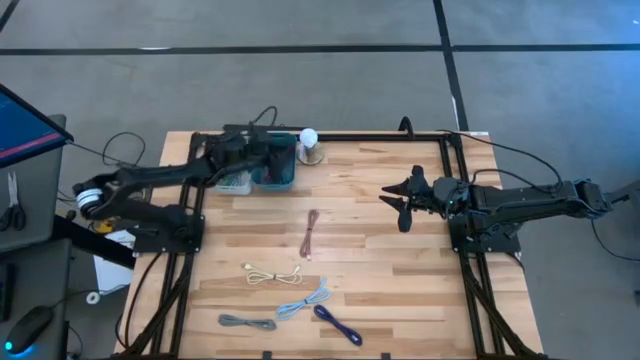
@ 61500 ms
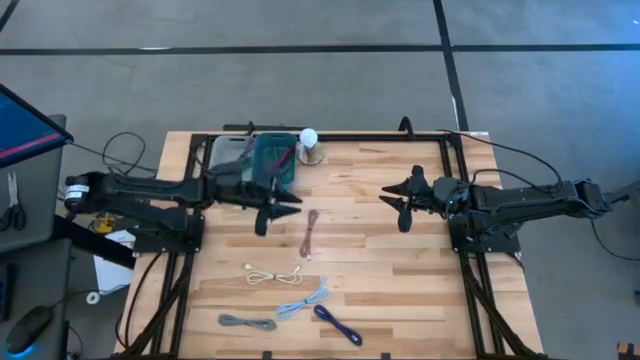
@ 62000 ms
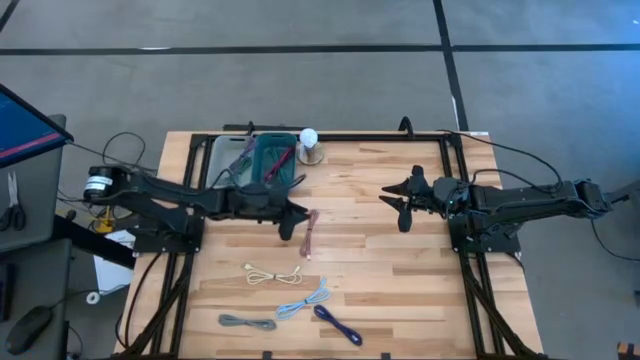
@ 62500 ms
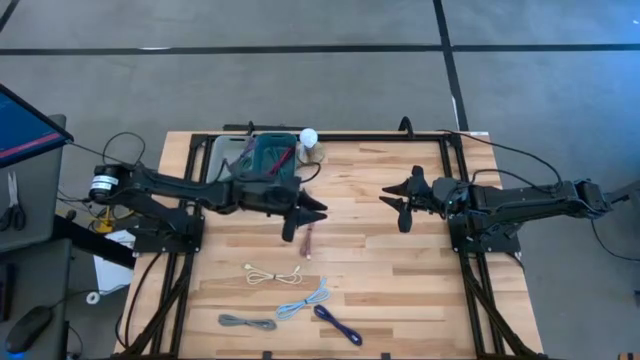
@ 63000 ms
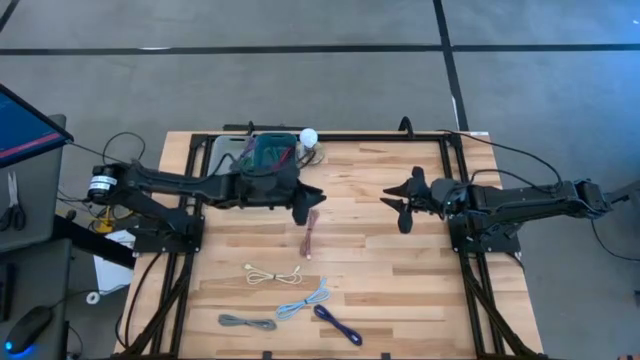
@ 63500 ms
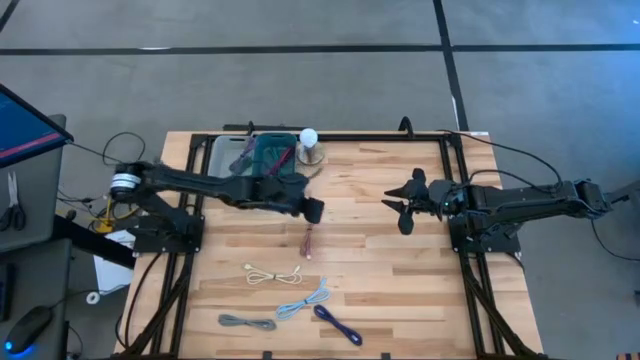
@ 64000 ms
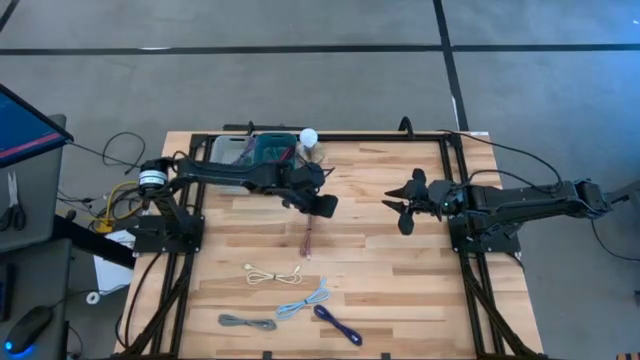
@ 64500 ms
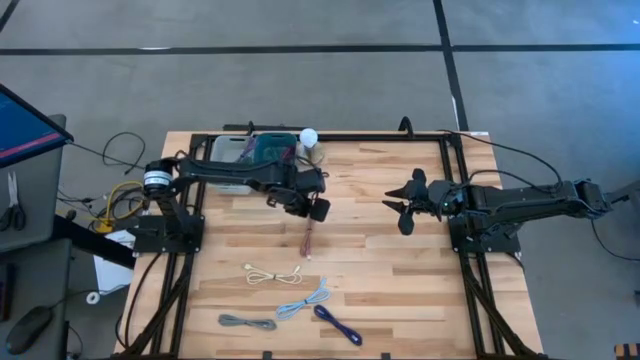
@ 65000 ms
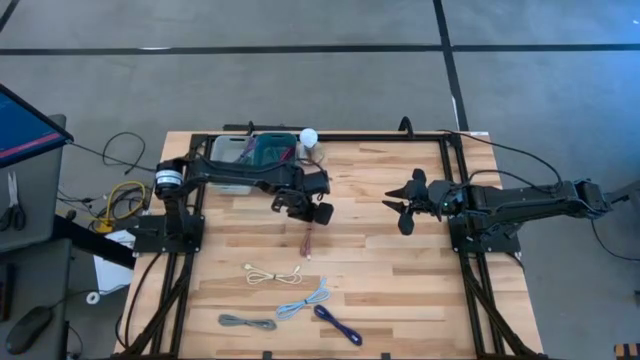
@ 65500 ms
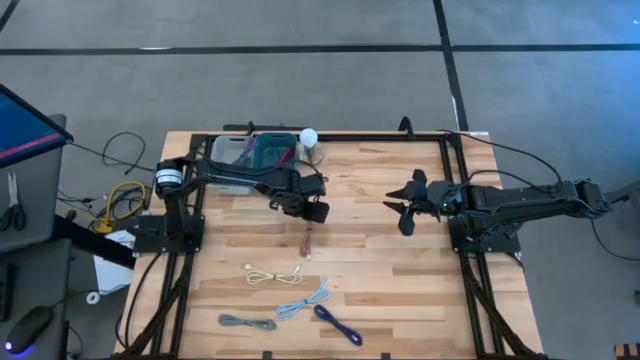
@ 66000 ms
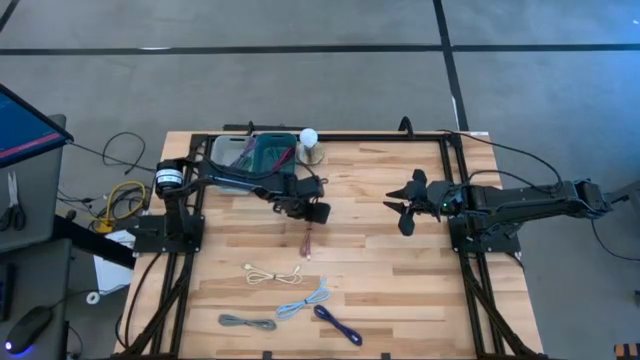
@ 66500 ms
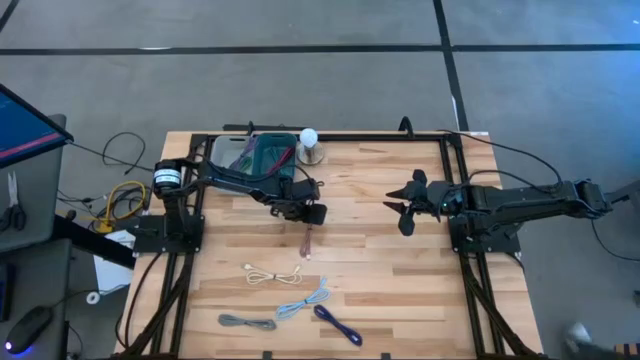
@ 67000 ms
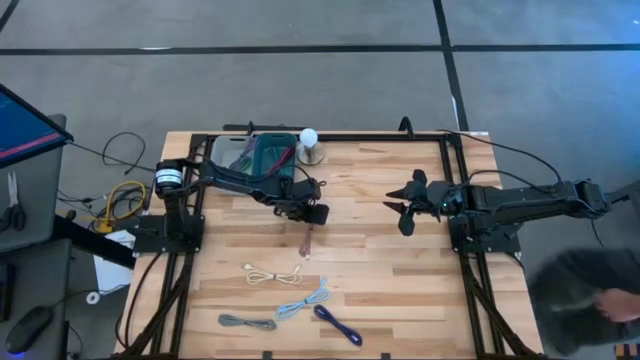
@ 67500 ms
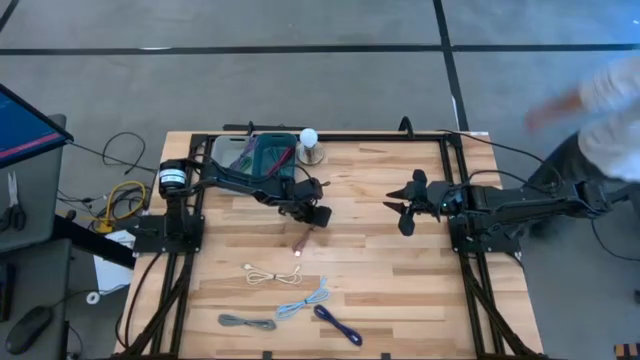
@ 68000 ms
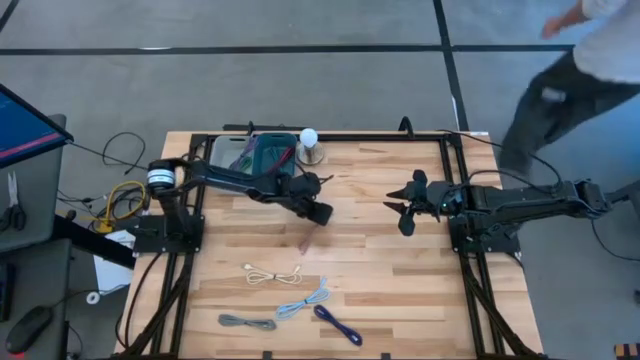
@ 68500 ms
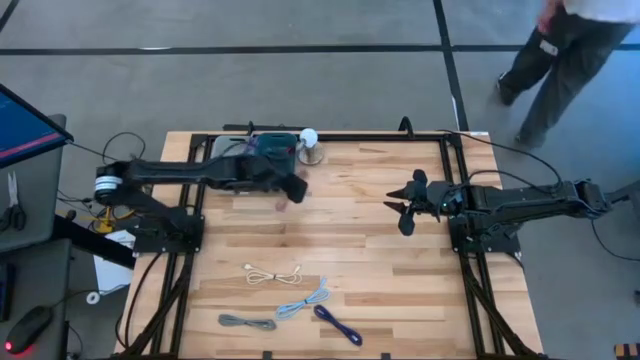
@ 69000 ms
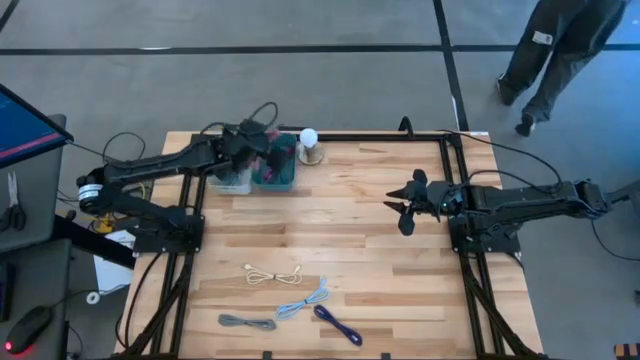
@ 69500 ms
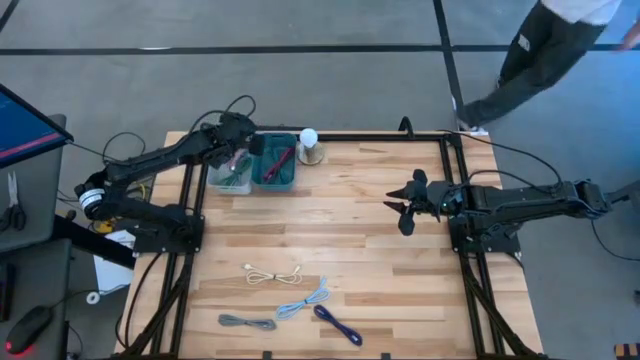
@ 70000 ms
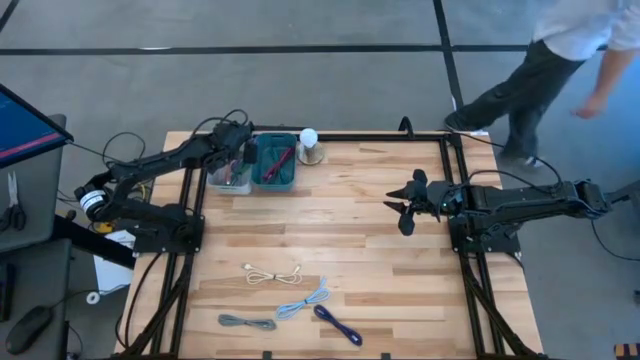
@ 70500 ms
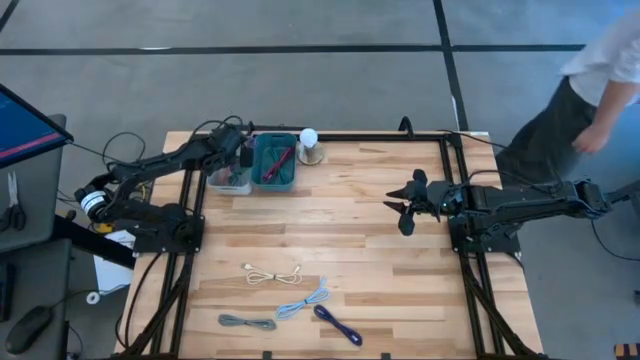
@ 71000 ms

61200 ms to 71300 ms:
Task: Pick & Place USB Port
Put the pink charger cable into the gray bin

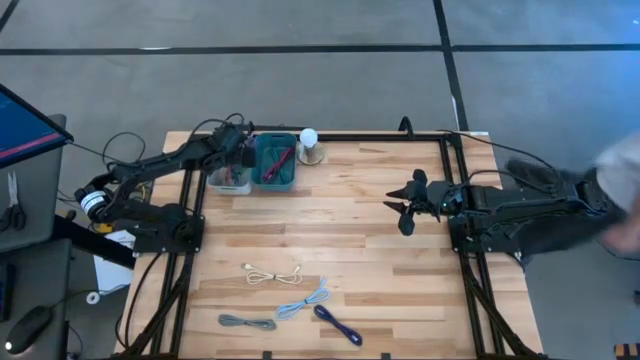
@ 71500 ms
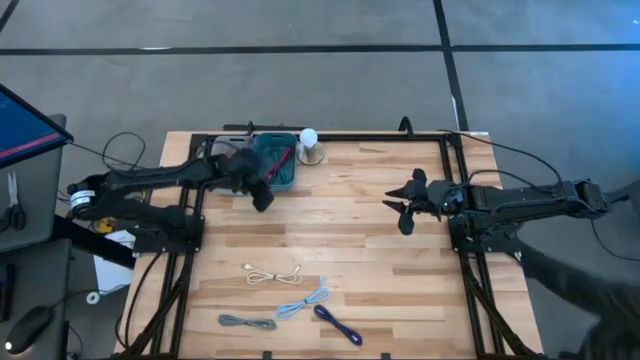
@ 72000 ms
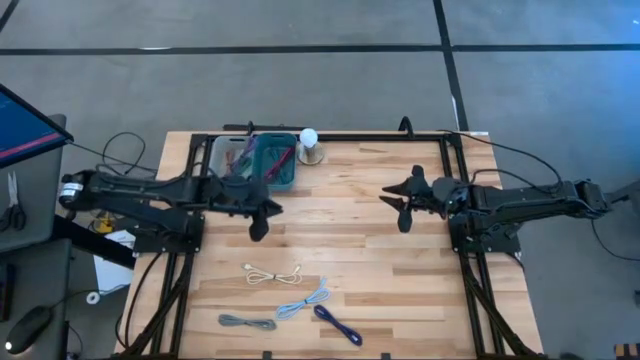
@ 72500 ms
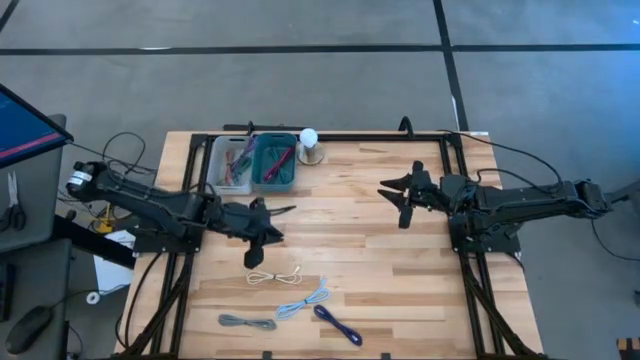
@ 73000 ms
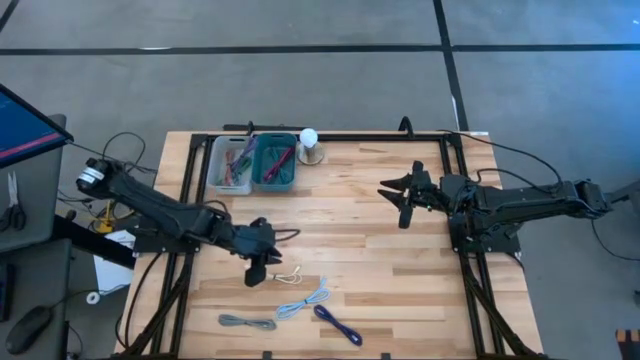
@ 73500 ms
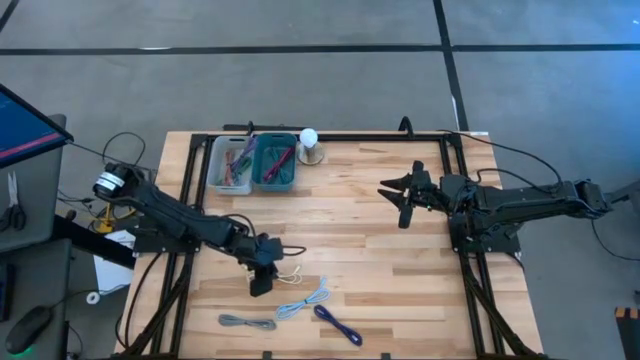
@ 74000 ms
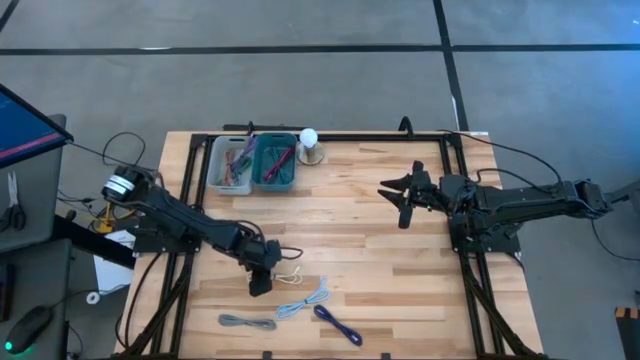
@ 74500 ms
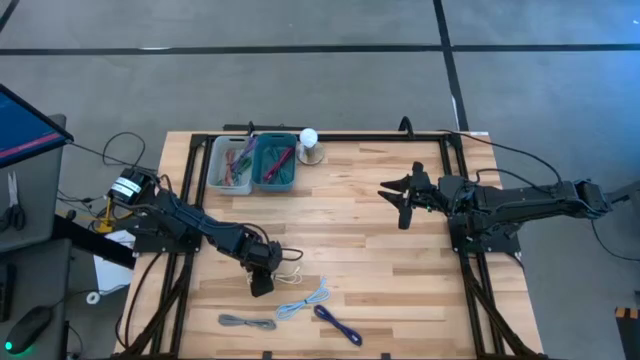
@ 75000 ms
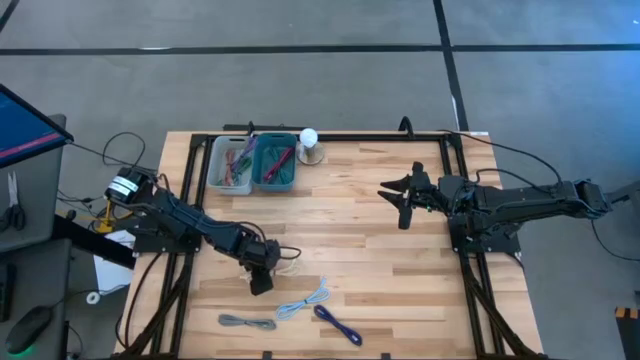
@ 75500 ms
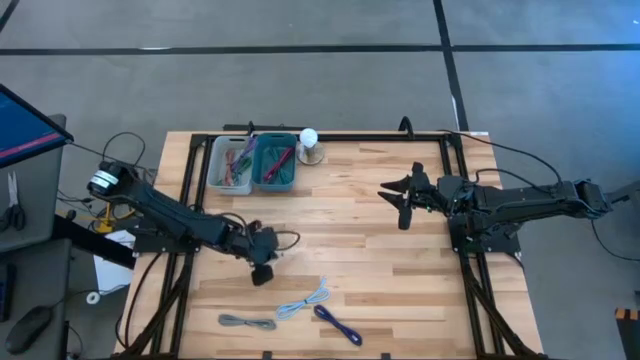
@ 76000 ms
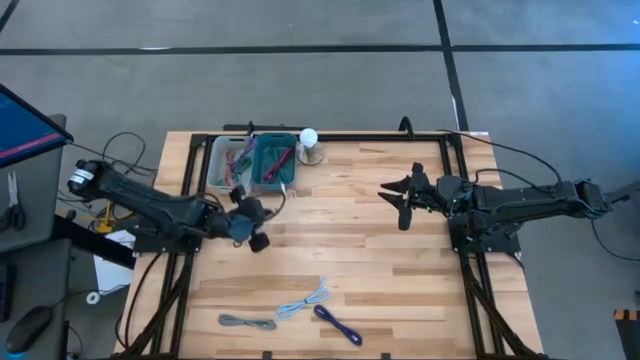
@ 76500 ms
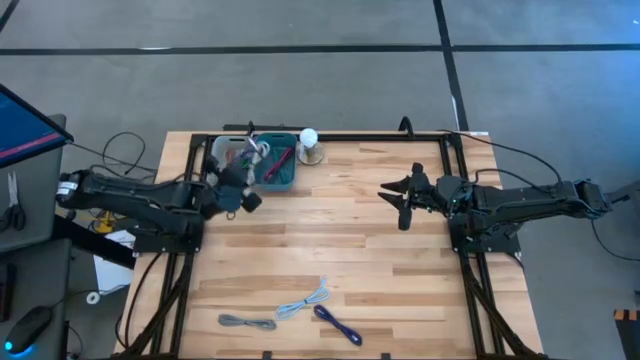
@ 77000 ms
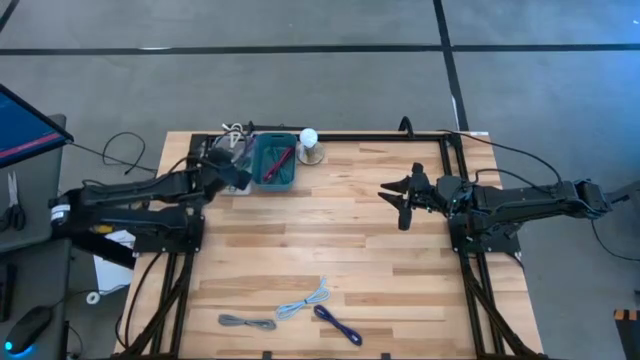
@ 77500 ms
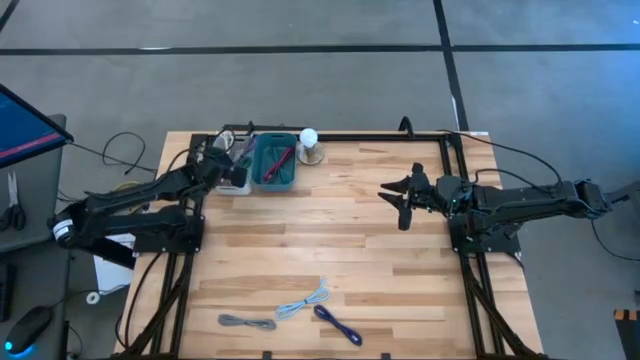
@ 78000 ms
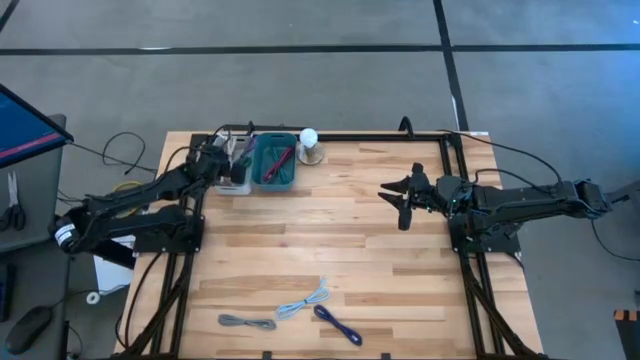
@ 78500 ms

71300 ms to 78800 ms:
Put the white charger cable into the gray bin
